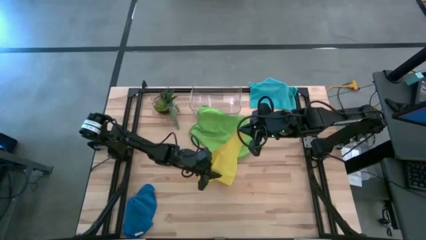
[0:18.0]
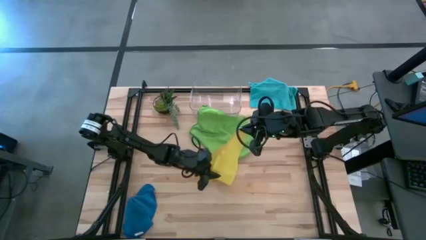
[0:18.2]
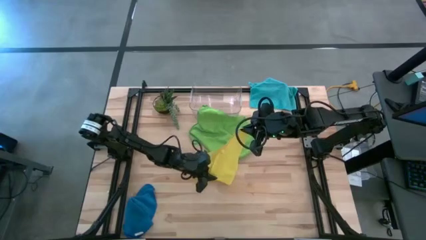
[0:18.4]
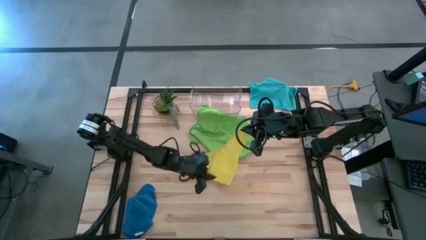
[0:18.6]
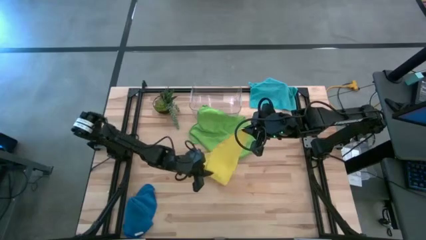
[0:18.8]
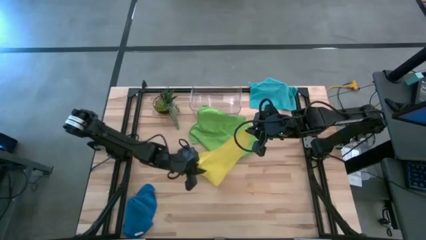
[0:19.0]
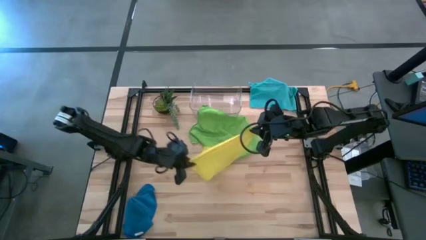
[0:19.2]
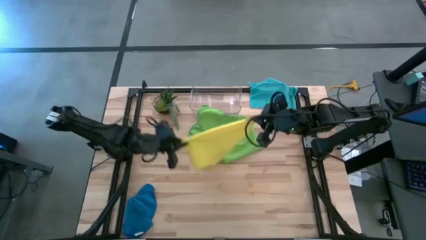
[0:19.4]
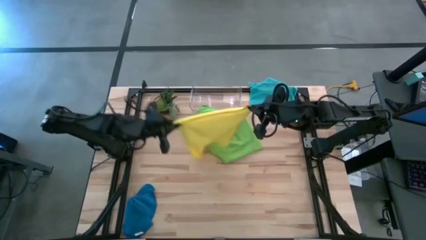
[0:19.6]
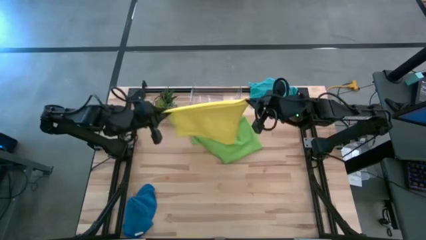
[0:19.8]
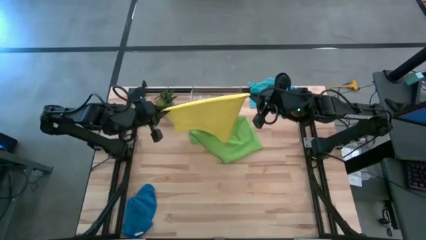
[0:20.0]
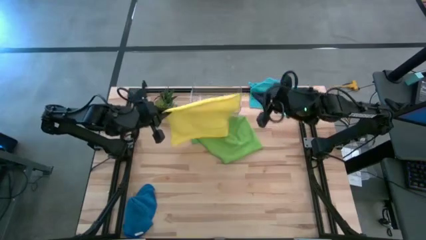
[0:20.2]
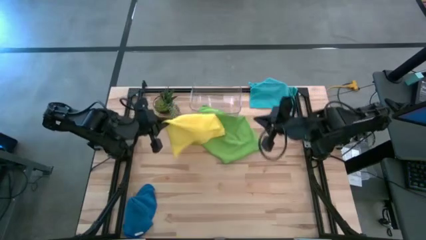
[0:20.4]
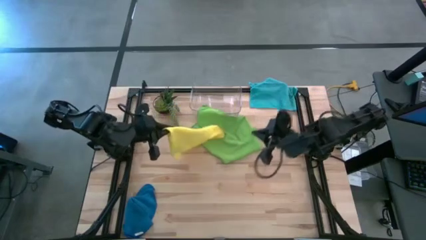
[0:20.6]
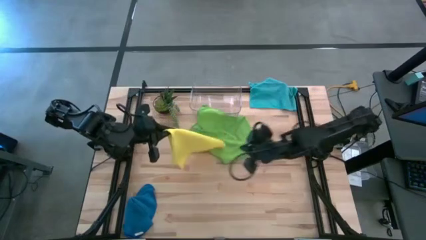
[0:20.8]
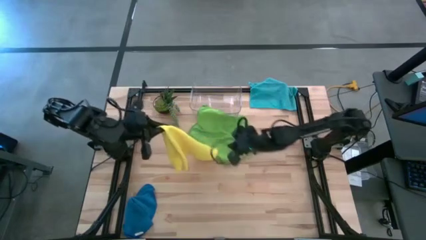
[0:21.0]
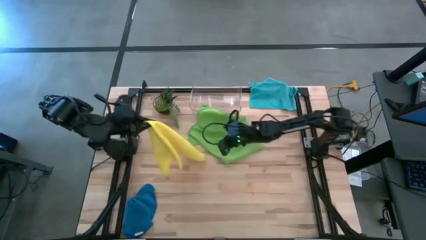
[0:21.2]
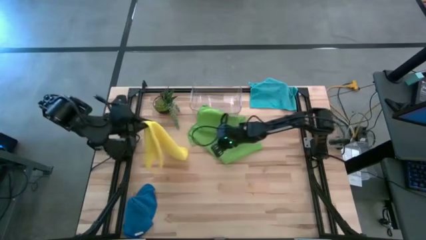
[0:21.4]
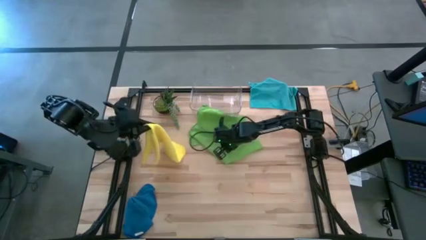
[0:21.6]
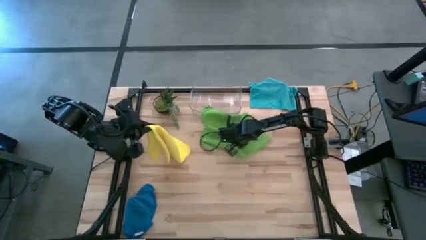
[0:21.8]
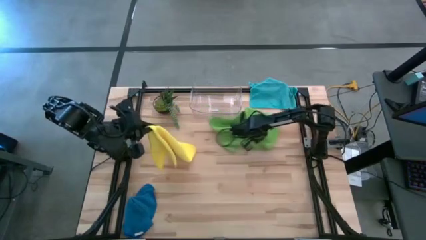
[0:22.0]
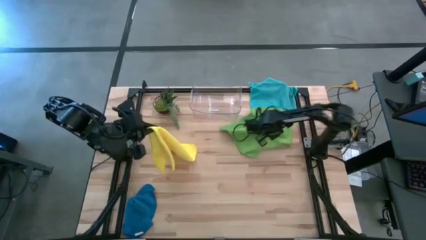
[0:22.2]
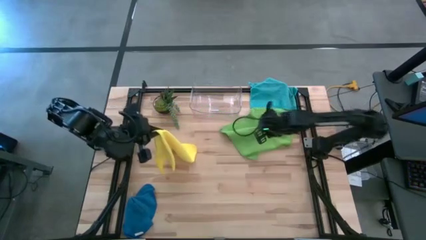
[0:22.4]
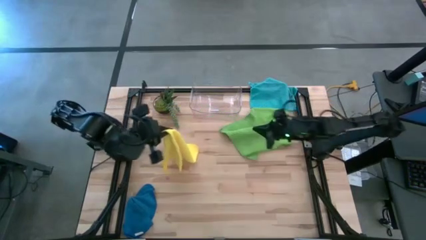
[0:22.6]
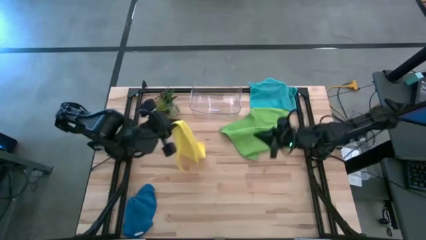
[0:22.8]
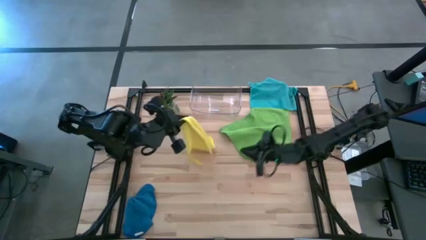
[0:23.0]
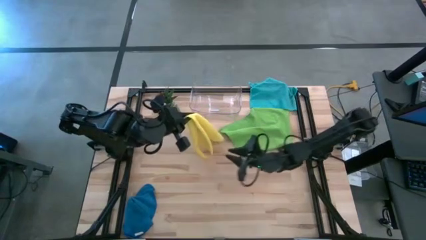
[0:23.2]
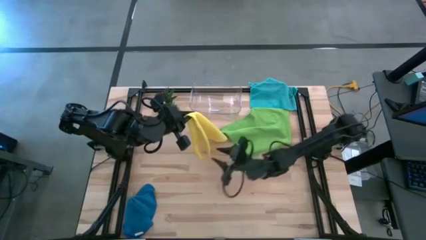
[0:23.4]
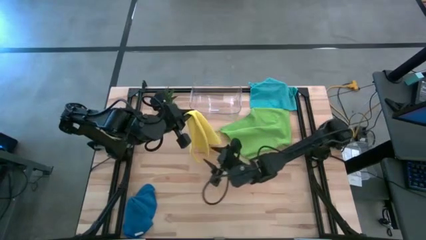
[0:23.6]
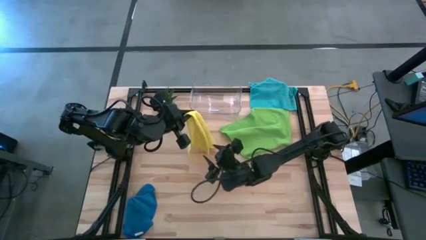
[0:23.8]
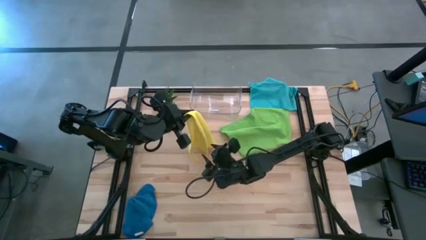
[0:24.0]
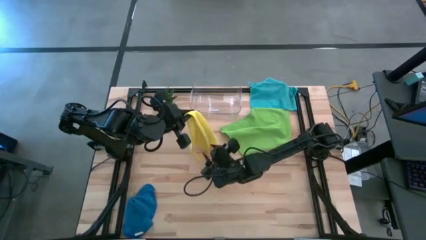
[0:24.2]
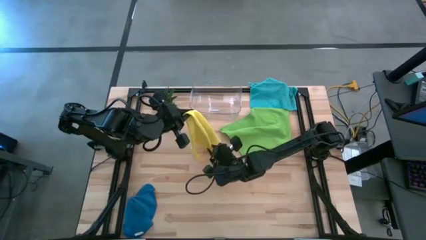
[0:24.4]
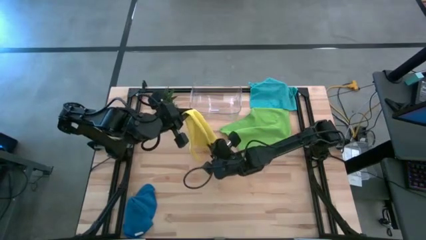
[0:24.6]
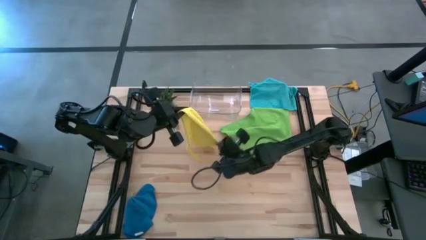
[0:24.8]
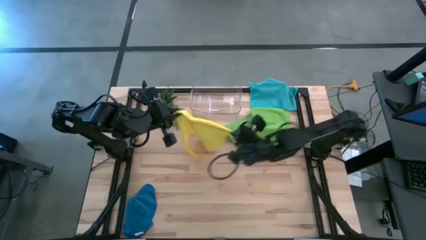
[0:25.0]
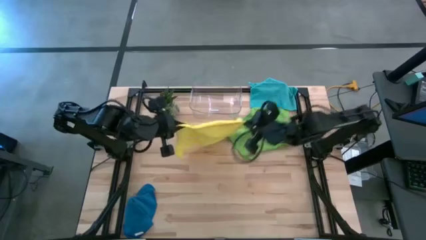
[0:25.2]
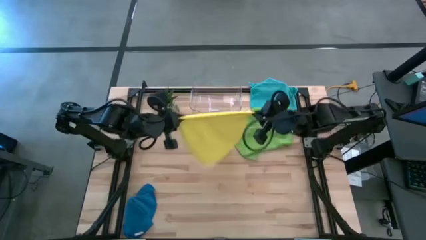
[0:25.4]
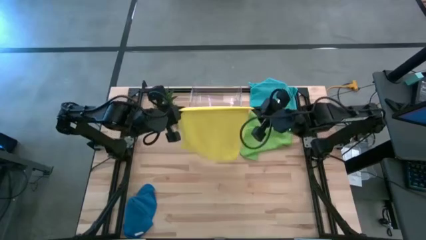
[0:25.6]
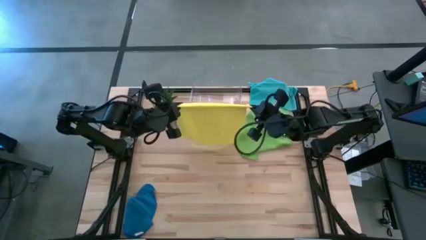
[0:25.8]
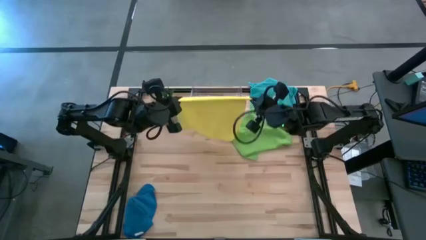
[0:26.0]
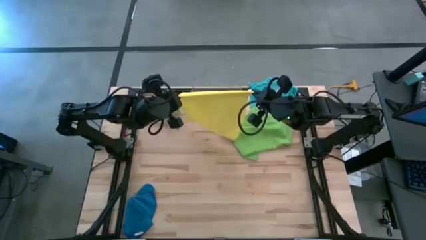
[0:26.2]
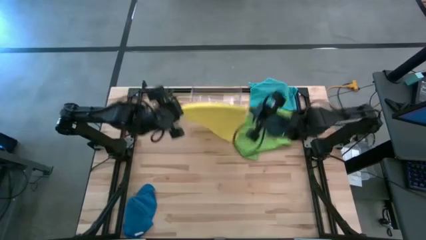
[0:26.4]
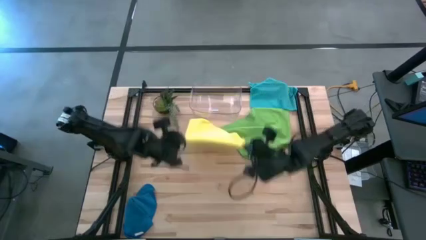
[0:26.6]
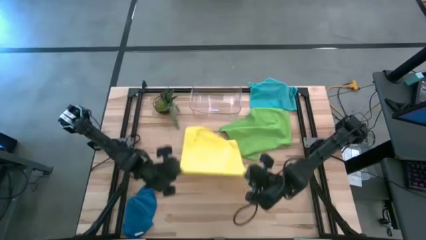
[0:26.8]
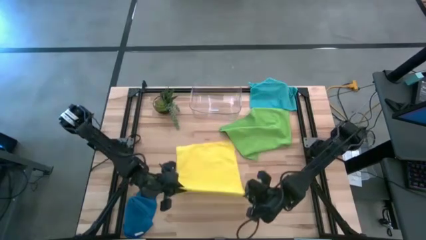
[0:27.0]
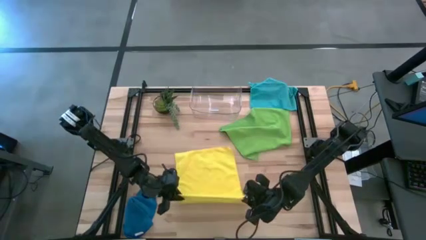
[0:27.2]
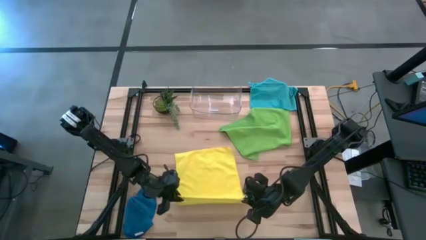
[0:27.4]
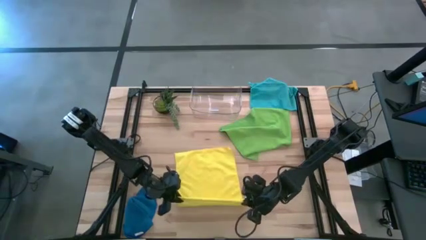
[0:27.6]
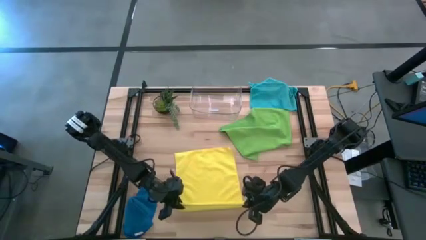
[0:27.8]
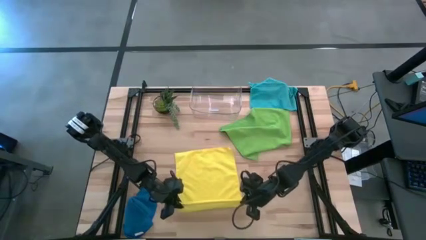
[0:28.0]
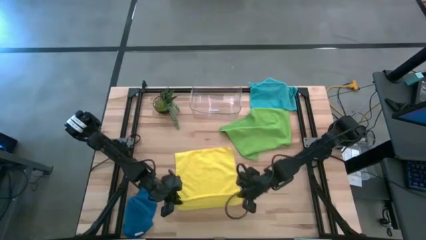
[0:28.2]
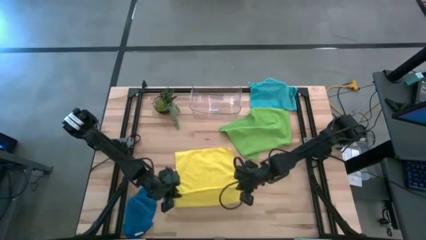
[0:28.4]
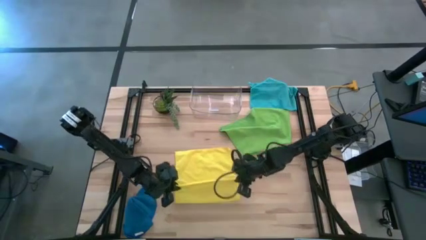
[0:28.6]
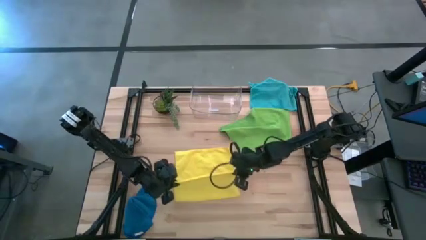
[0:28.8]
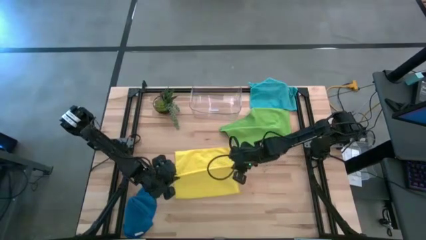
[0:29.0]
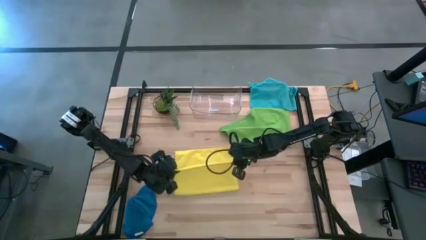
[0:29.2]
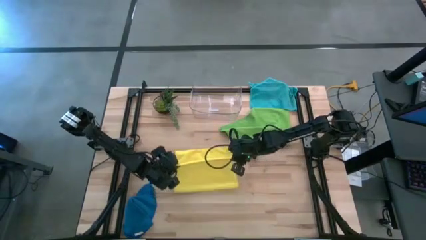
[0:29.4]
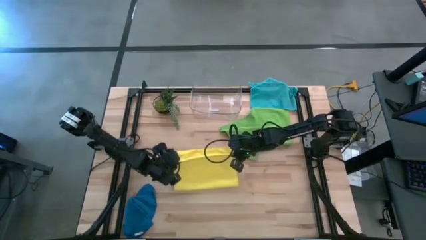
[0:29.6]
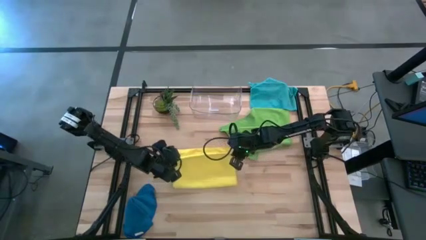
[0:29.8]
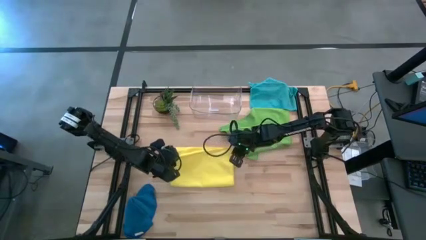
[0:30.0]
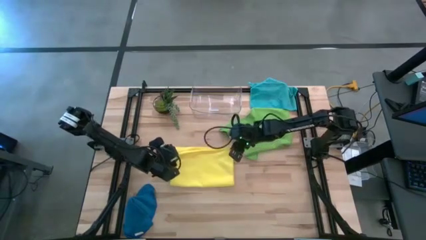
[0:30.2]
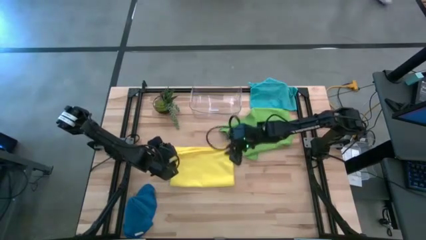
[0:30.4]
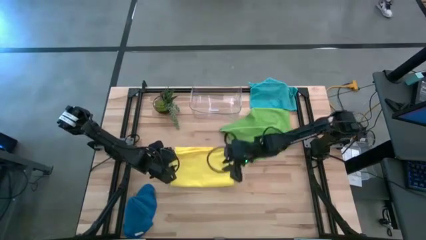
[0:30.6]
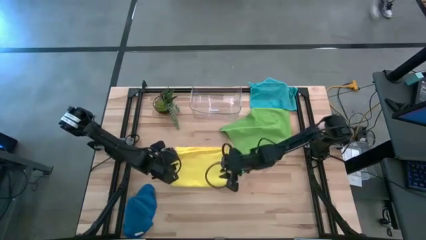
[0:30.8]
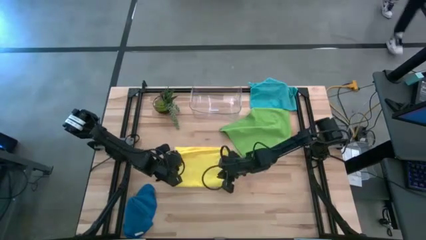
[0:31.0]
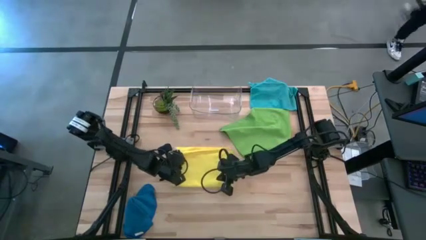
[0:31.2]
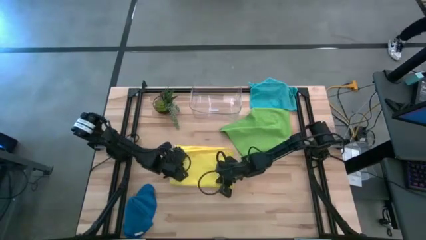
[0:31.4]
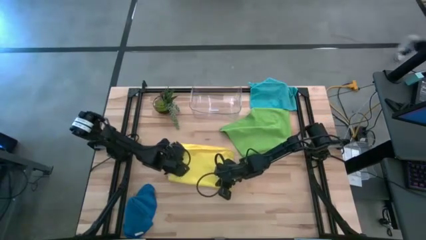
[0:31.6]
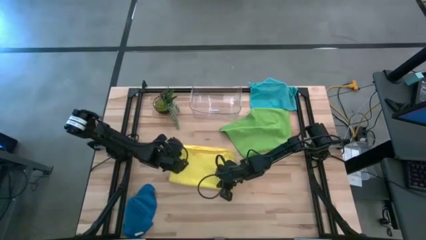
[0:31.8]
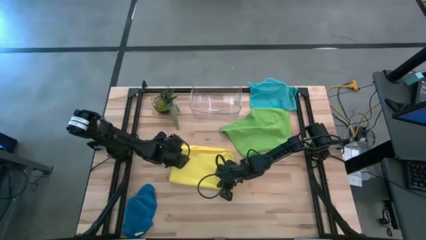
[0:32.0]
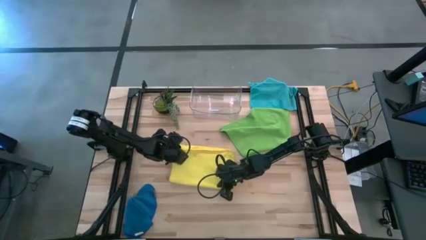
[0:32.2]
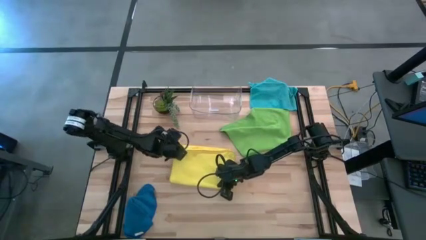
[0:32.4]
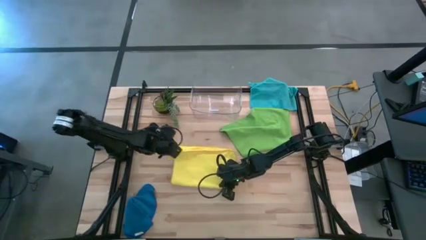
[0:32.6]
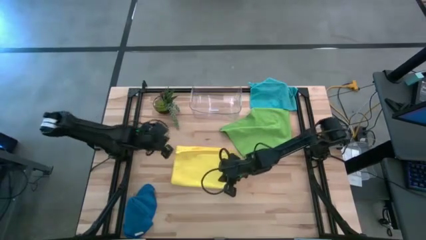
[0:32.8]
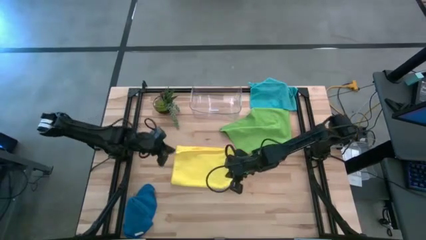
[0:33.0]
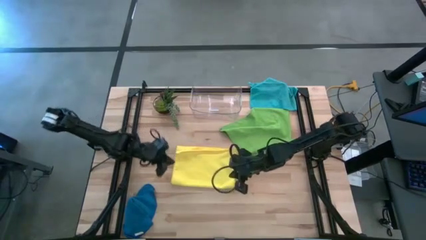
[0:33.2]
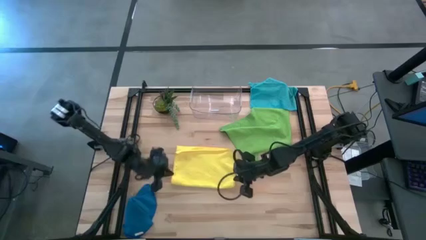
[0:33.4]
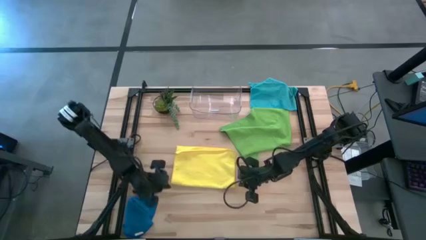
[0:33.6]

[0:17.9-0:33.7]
Task: Fold microfiber towels
Fold the yellow towel
